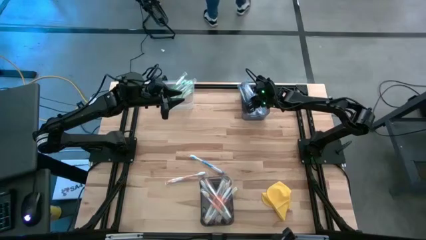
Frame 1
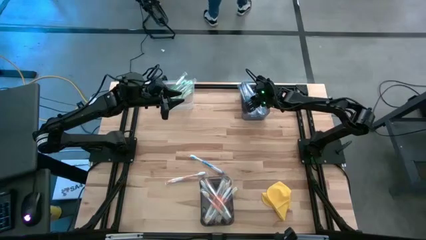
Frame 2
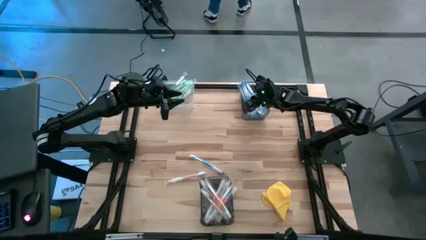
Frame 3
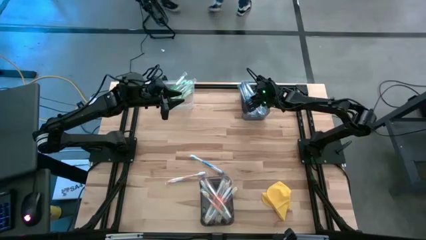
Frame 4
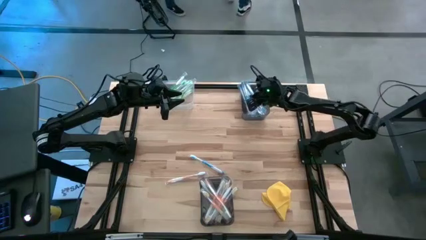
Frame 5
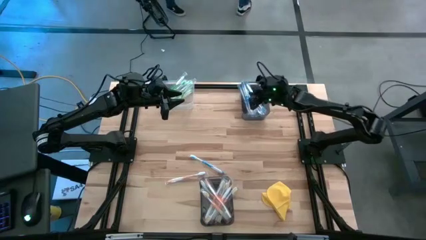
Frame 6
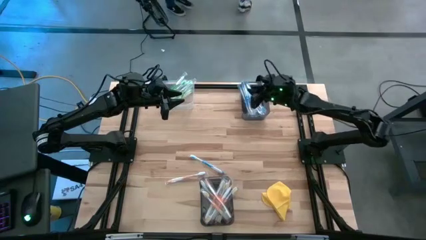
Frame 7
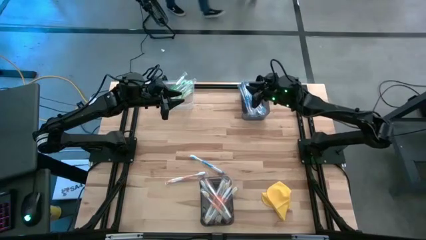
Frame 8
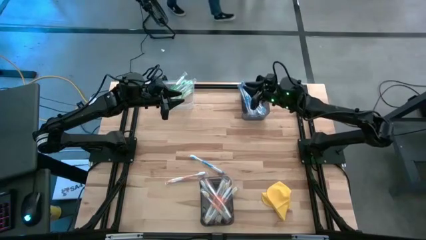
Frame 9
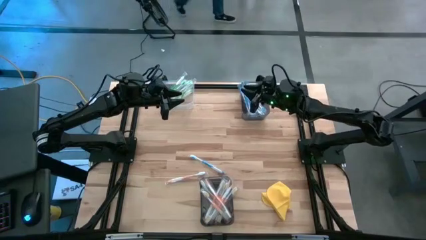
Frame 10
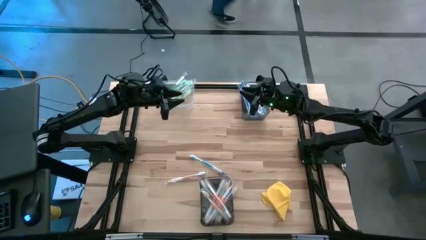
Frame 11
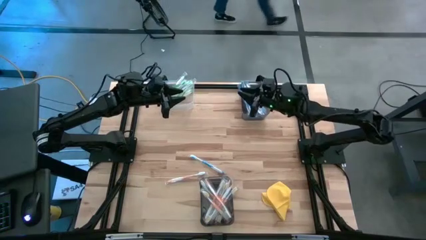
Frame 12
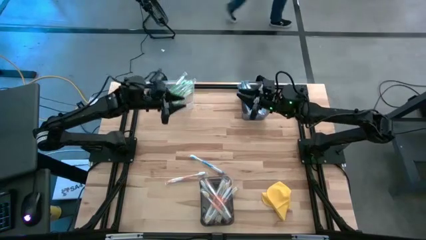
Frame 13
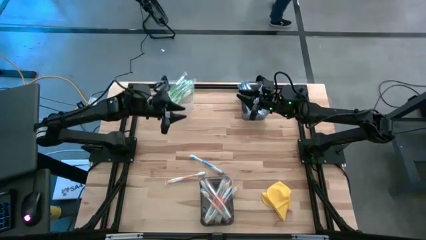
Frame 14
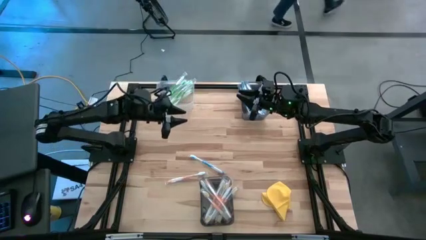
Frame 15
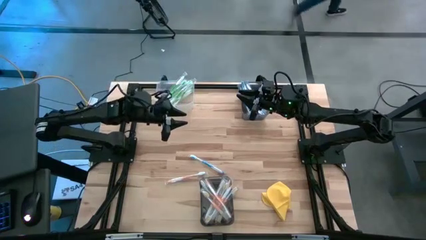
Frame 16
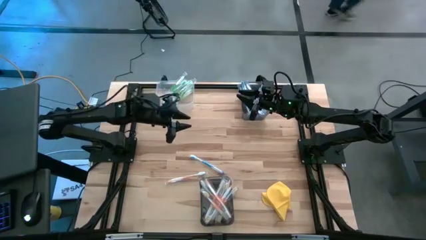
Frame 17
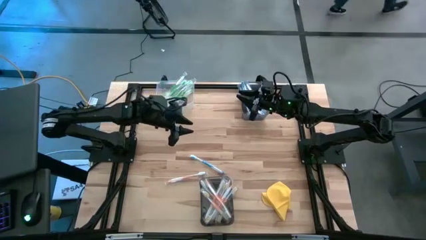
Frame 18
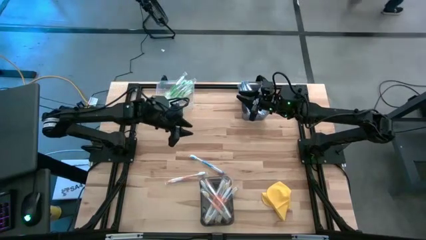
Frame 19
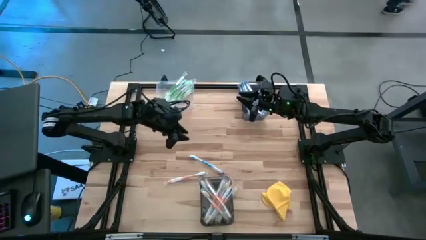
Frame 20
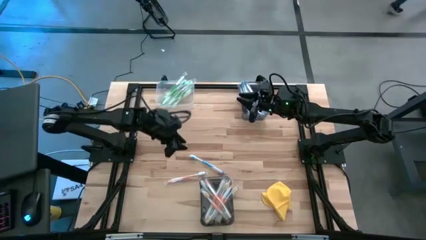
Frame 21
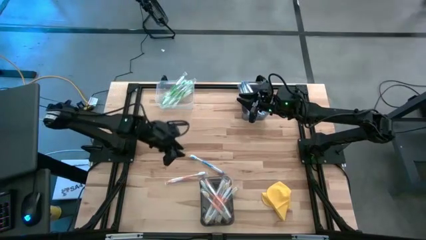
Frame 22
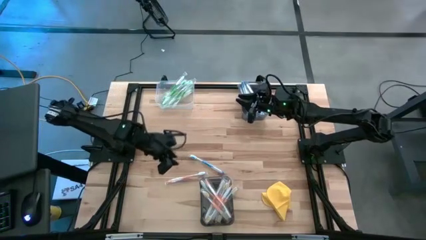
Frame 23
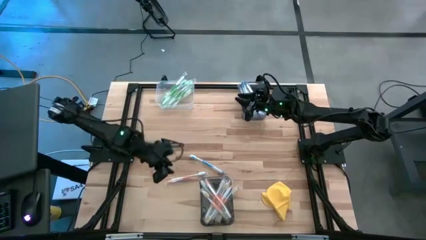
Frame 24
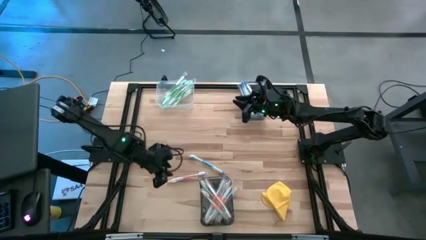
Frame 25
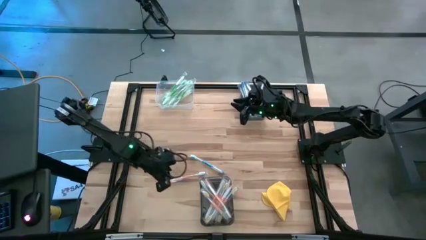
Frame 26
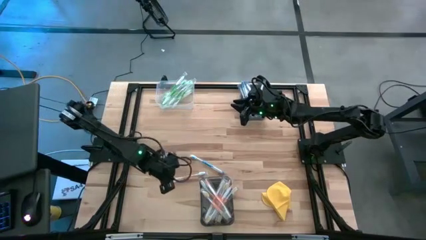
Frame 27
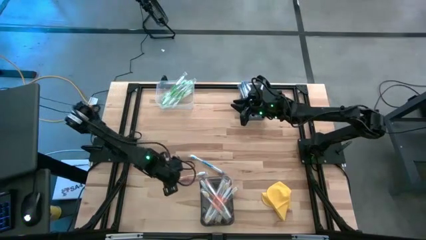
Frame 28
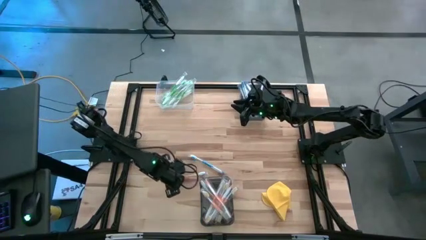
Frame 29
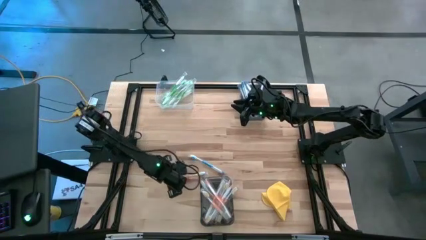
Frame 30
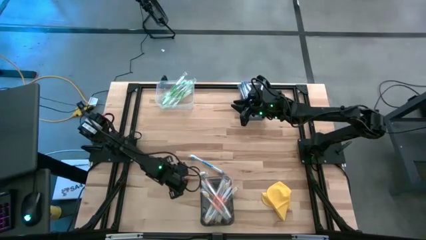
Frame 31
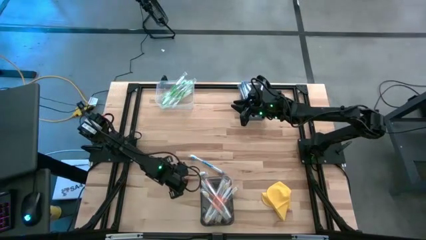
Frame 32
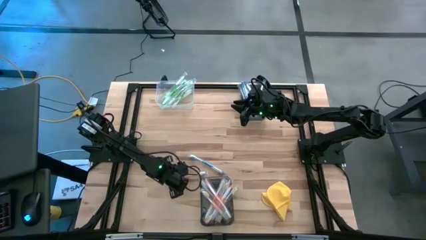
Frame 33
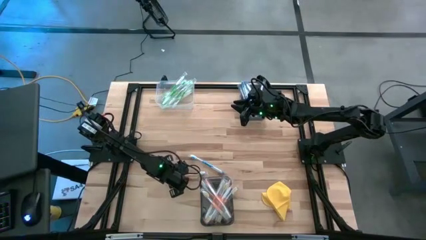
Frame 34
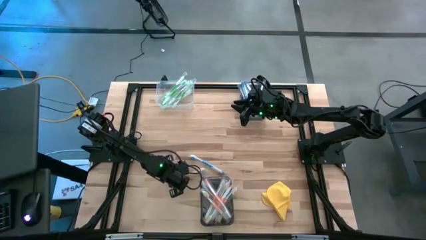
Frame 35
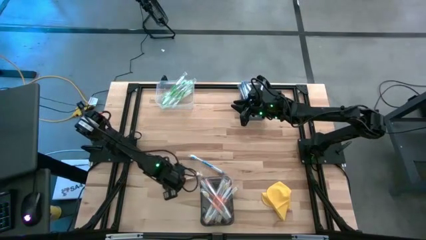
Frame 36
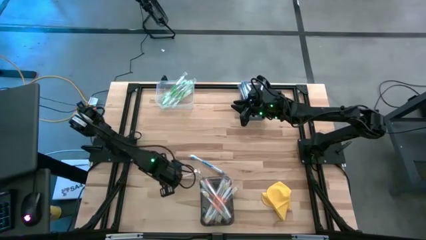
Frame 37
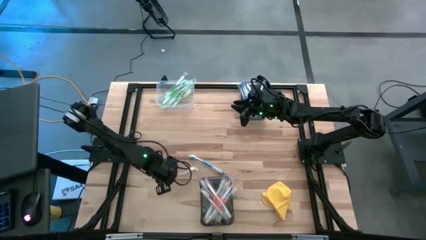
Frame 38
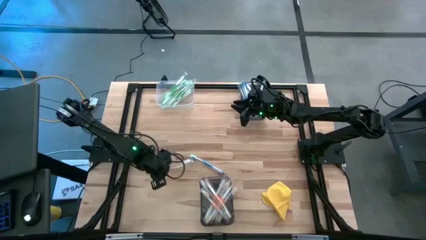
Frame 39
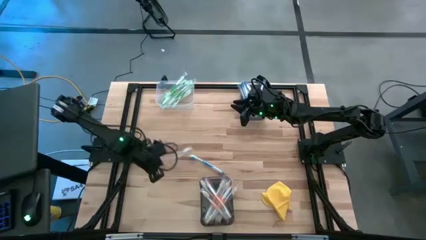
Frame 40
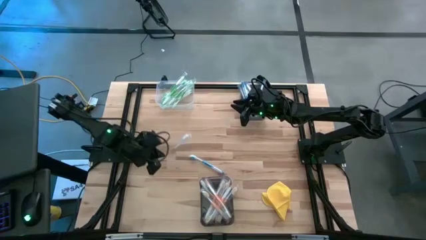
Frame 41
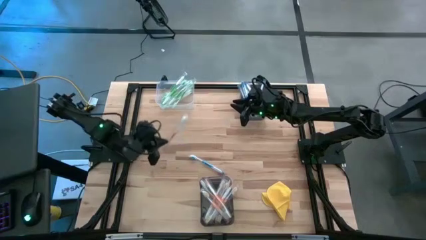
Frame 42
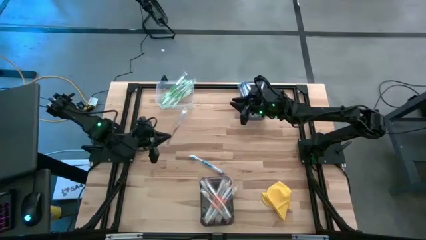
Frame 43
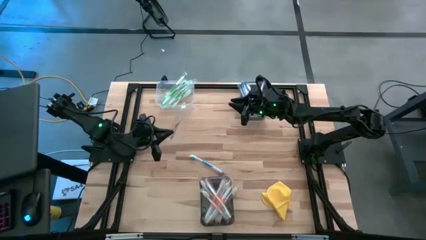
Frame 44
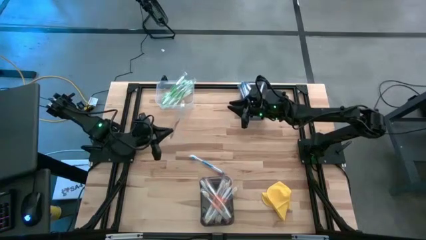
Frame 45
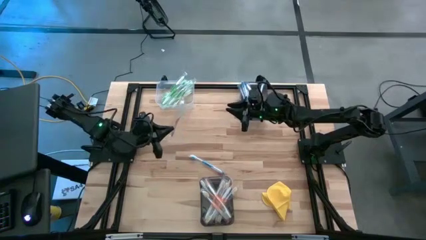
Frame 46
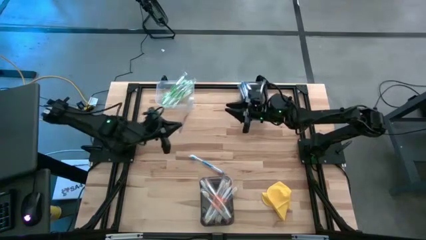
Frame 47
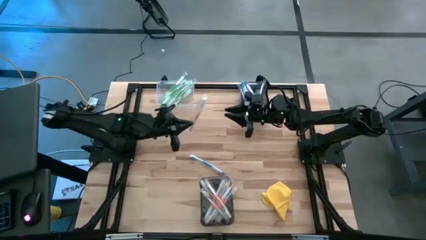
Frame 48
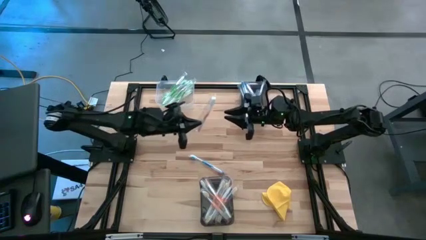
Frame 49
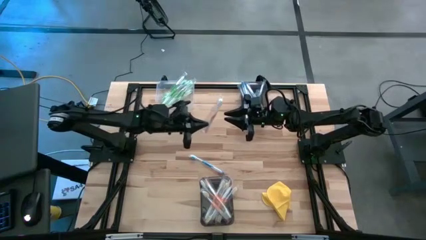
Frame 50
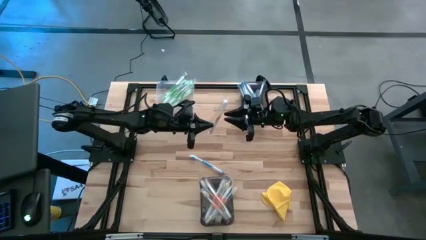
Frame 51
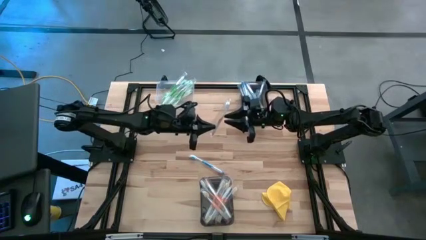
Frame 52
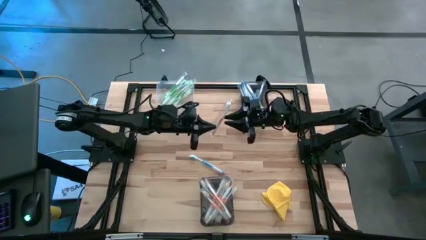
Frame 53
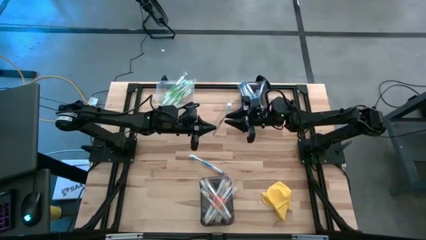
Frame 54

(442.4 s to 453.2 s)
Task: Pick & Place Toothbrushes
Put the orange toothbrush into the bottom black bin

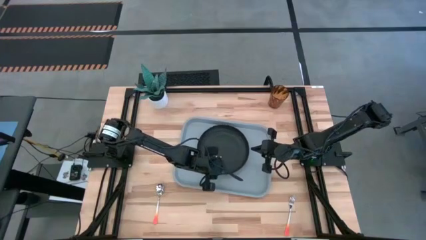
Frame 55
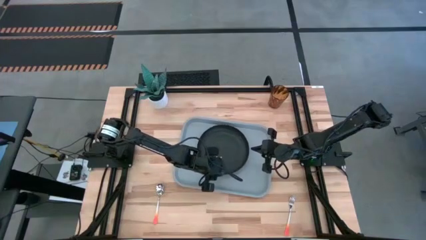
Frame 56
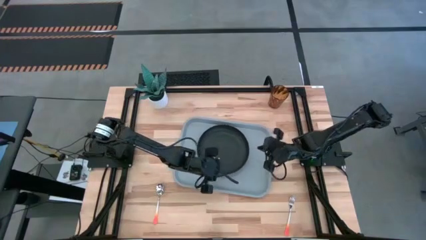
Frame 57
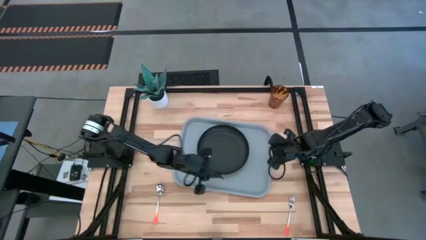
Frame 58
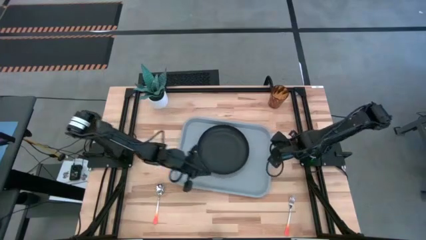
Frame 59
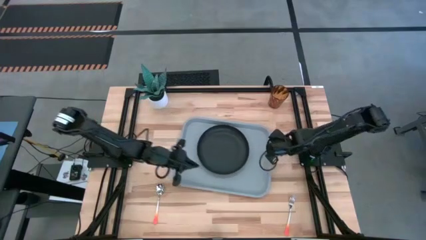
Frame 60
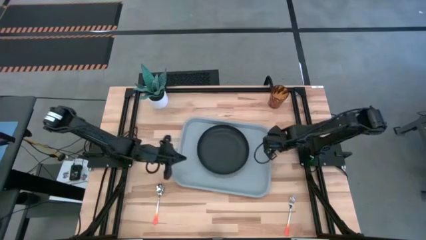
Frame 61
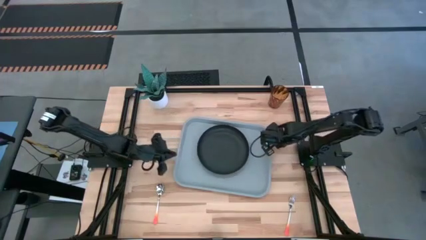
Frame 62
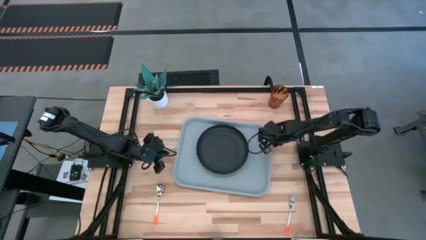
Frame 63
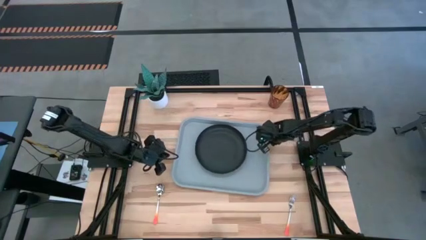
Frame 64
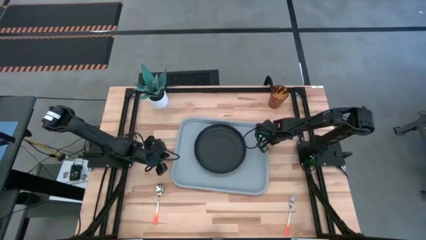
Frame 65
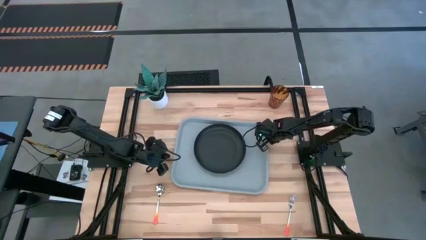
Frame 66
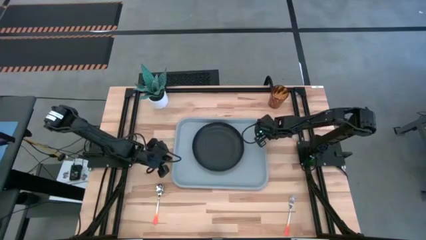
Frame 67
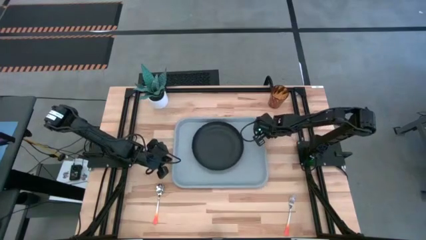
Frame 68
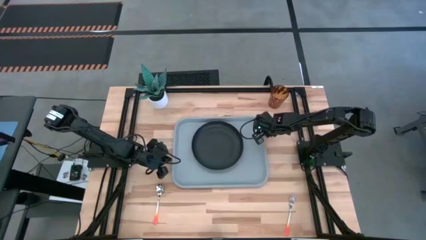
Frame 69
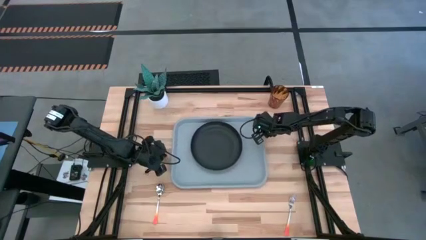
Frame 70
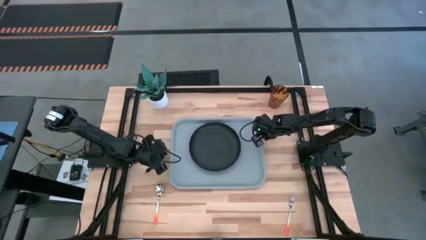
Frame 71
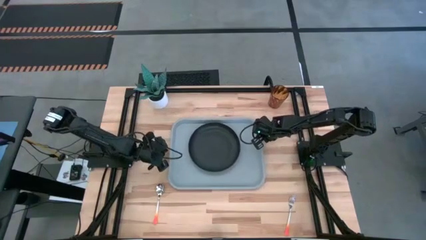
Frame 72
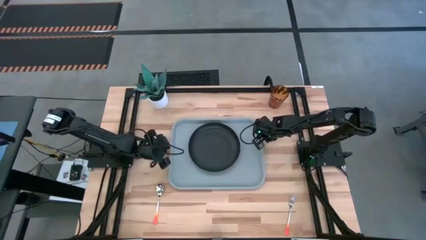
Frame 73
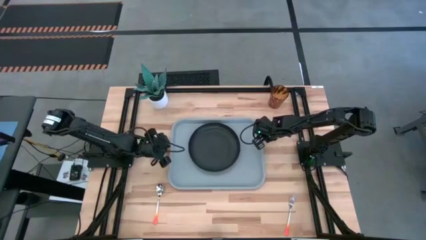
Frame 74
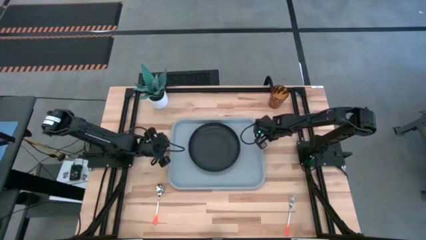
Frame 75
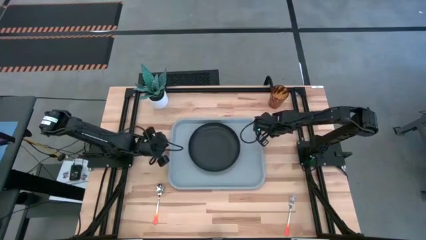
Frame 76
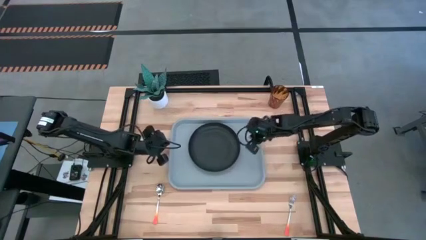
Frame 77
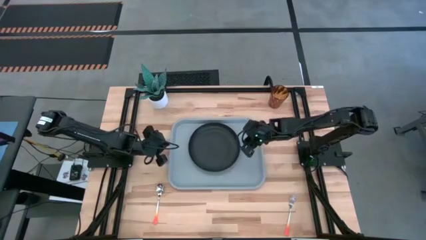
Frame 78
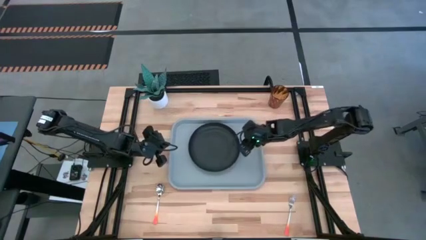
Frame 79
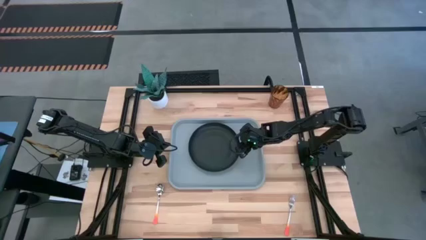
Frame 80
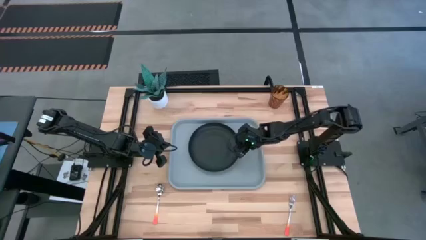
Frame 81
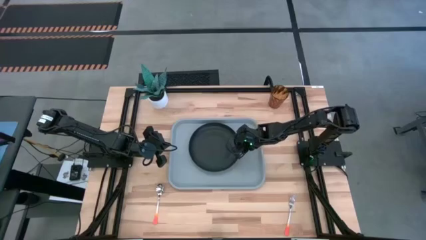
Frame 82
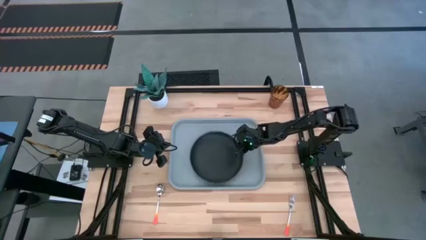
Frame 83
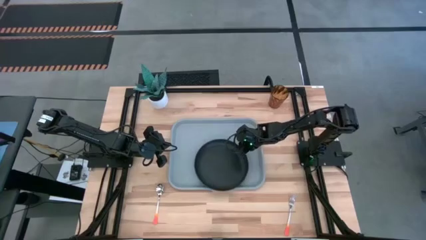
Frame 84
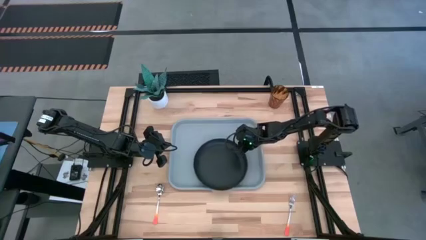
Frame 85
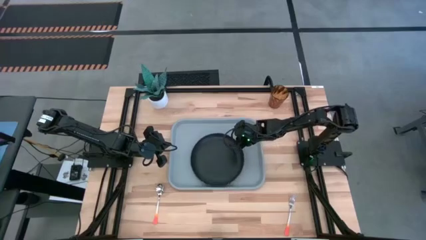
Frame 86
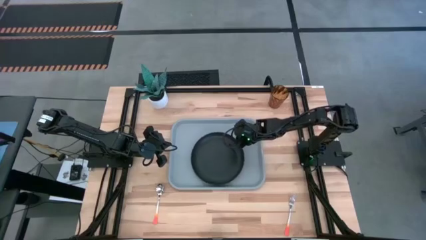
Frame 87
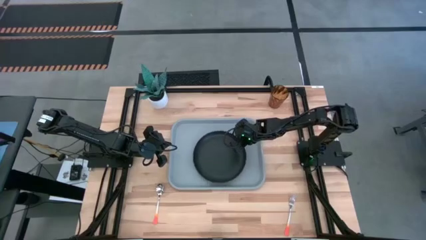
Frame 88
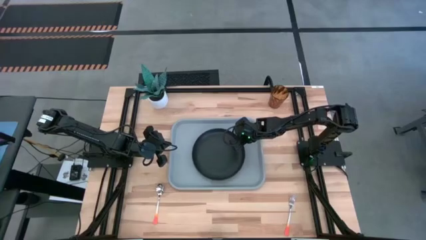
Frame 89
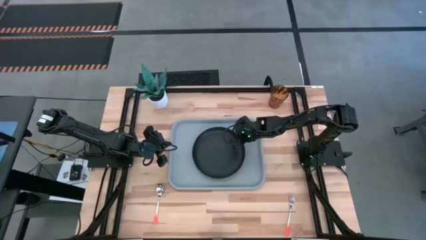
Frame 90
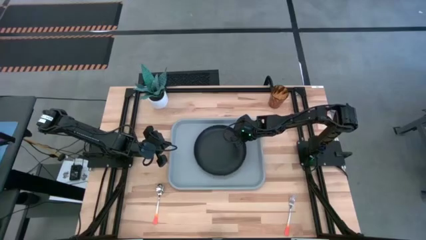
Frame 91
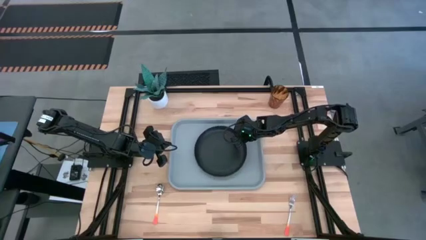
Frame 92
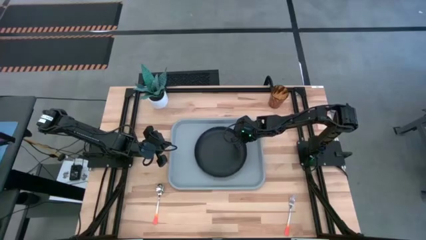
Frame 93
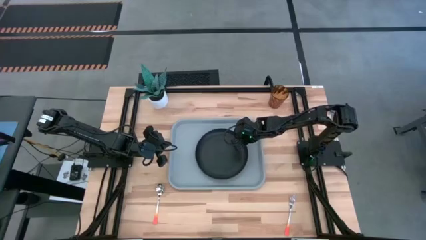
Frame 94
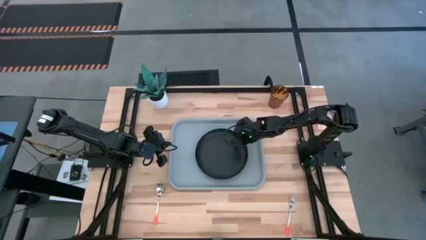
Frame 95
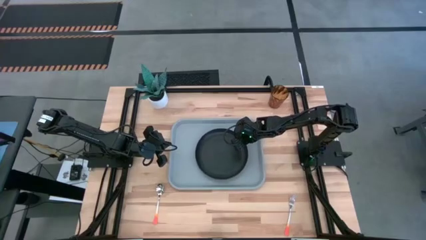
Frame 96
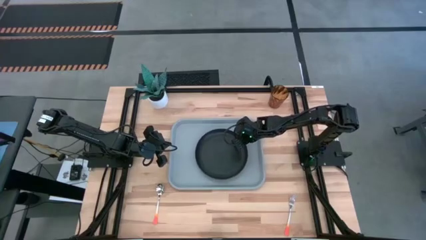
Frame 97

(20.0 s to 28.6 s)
Task: Pick and place plate/cup/fork/spoon on tray
Adjust the gray tray and the black plate
